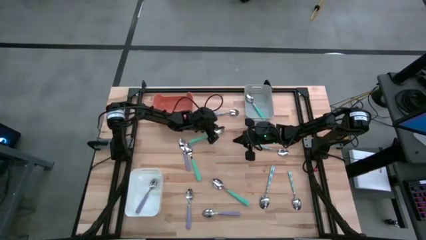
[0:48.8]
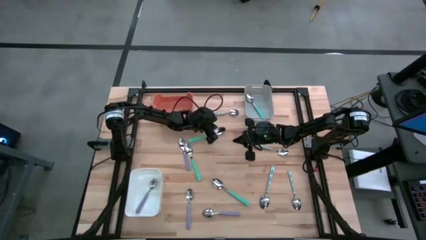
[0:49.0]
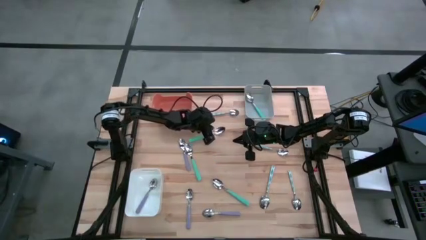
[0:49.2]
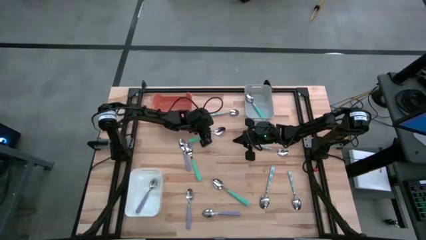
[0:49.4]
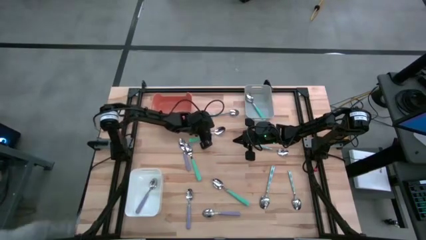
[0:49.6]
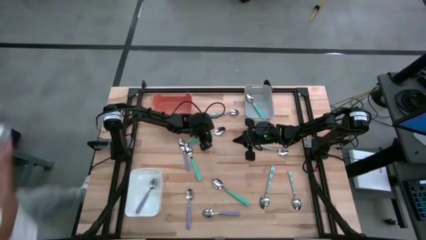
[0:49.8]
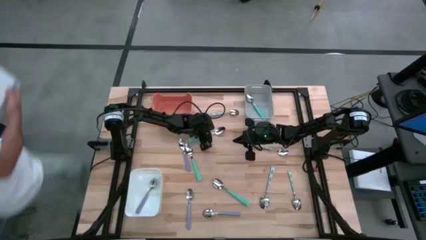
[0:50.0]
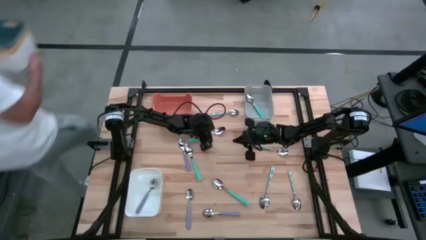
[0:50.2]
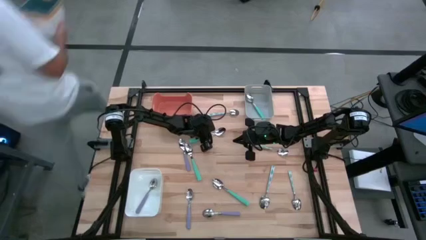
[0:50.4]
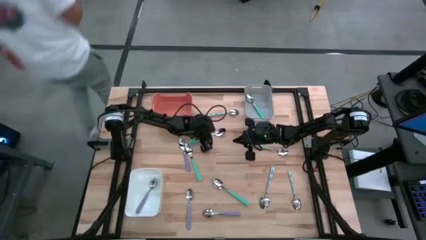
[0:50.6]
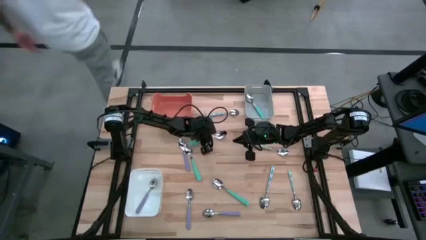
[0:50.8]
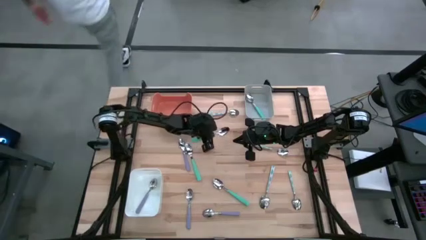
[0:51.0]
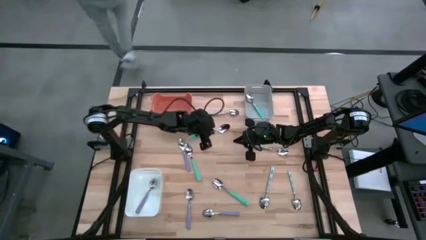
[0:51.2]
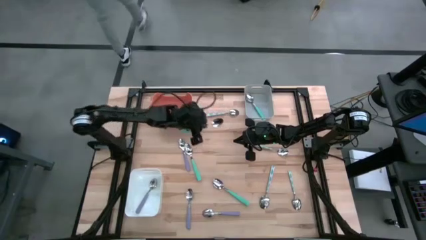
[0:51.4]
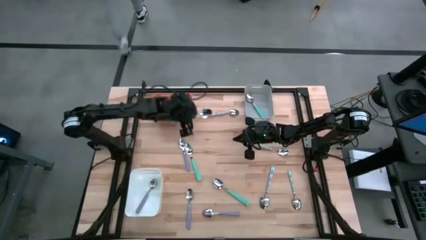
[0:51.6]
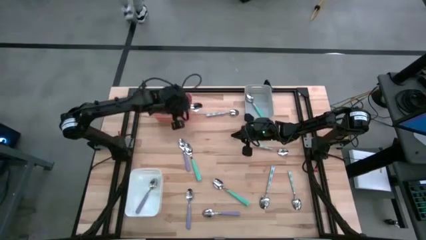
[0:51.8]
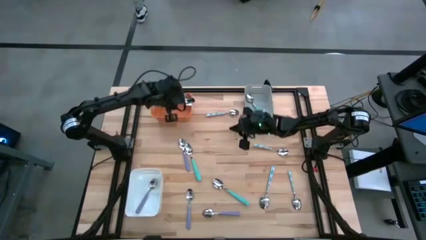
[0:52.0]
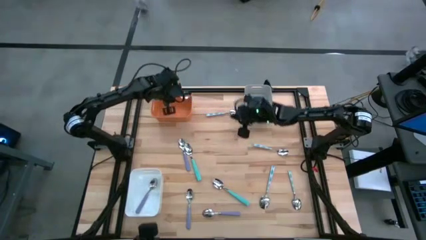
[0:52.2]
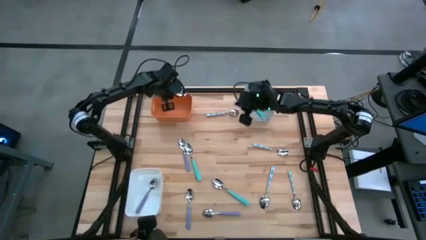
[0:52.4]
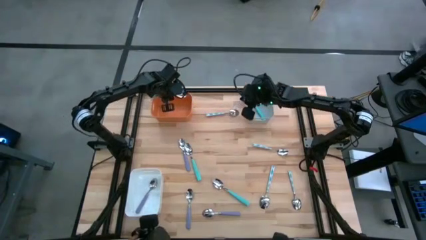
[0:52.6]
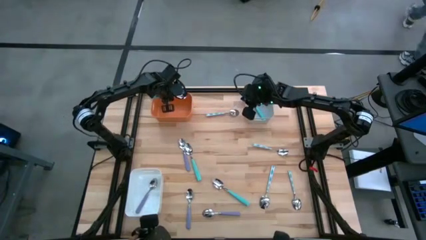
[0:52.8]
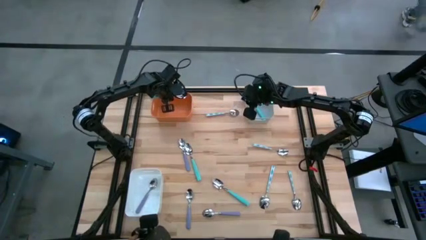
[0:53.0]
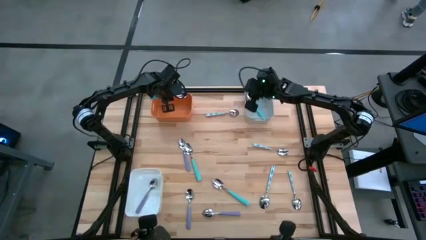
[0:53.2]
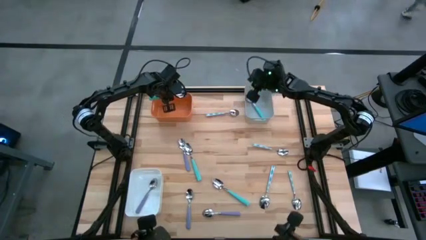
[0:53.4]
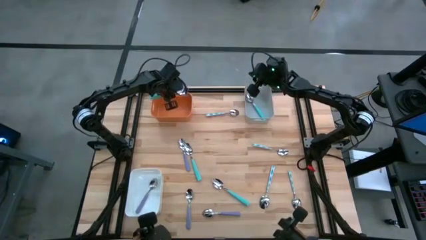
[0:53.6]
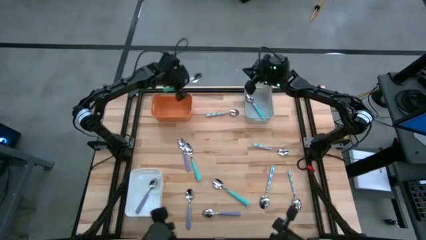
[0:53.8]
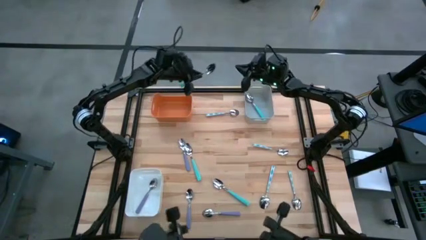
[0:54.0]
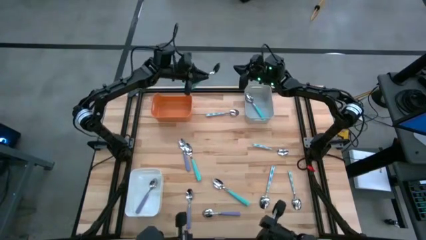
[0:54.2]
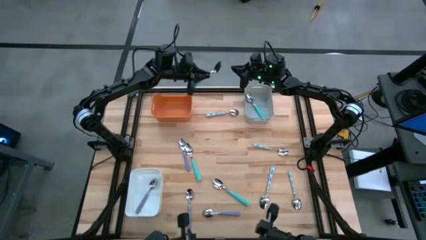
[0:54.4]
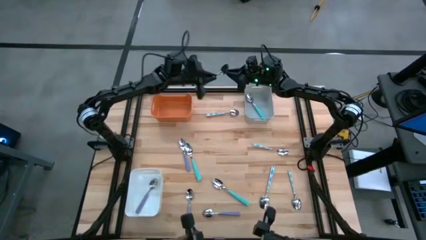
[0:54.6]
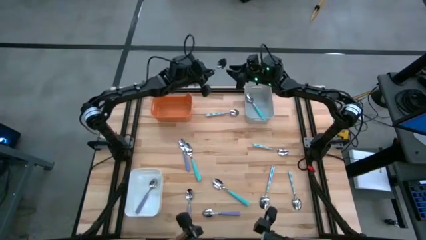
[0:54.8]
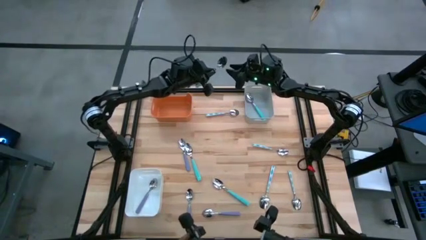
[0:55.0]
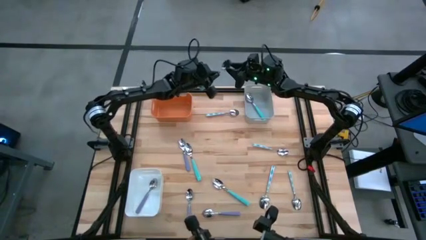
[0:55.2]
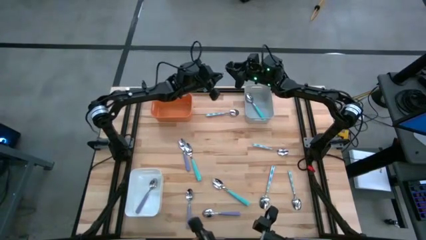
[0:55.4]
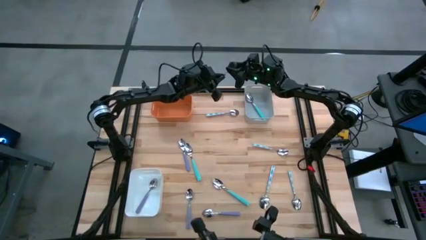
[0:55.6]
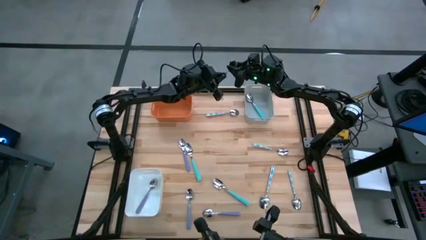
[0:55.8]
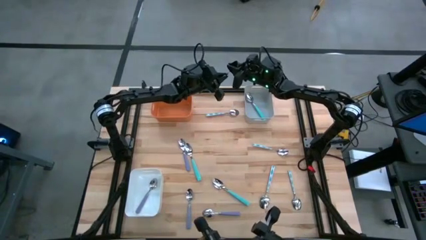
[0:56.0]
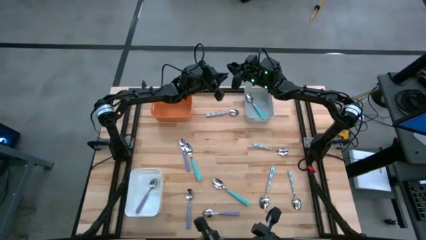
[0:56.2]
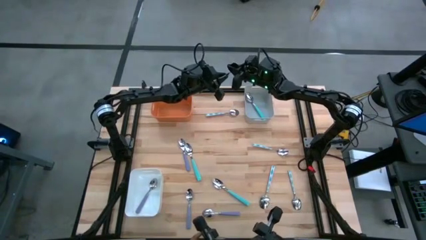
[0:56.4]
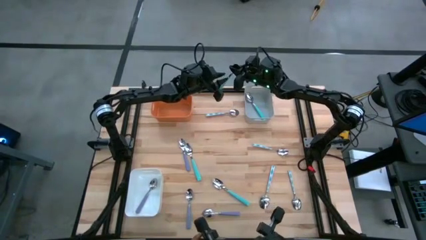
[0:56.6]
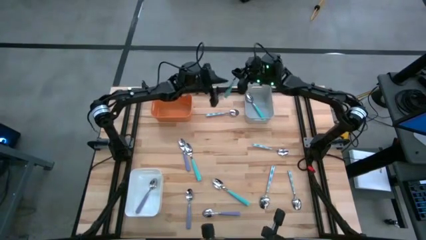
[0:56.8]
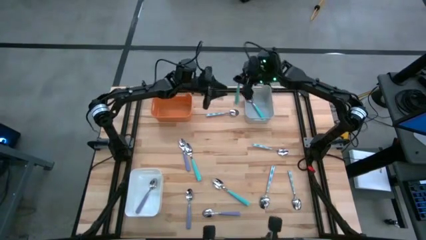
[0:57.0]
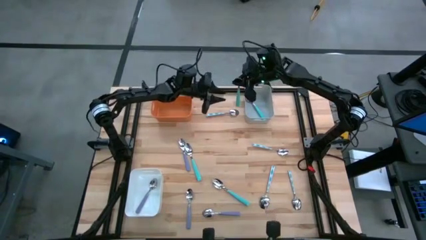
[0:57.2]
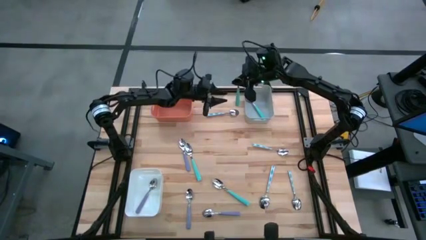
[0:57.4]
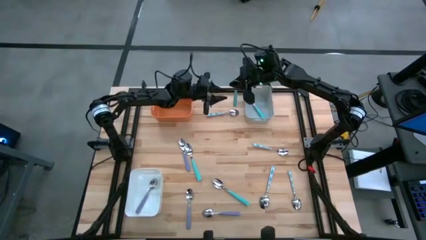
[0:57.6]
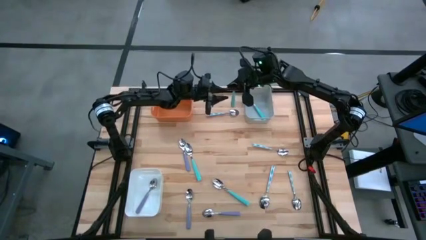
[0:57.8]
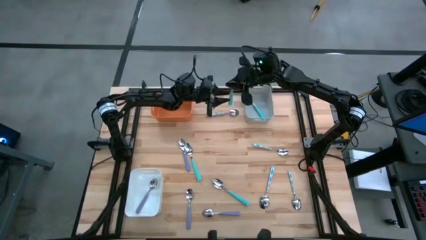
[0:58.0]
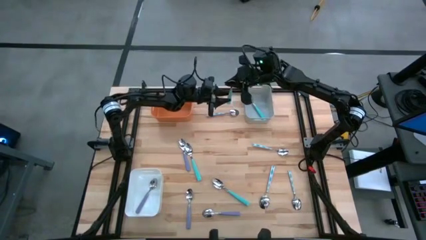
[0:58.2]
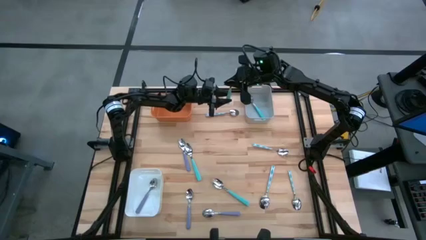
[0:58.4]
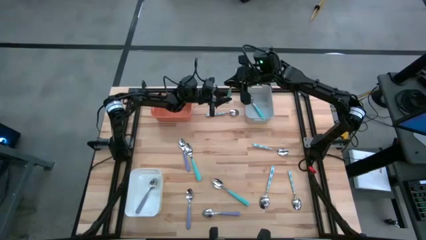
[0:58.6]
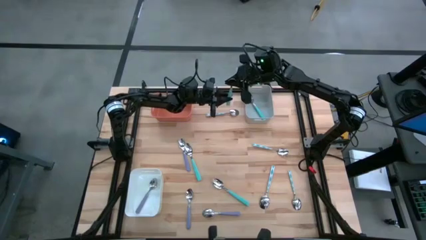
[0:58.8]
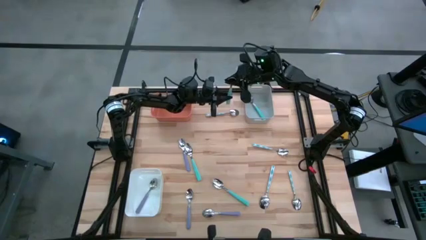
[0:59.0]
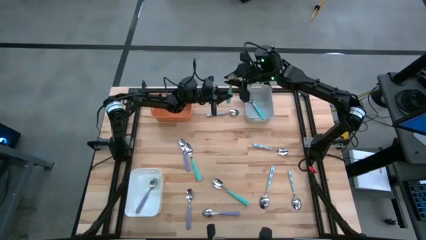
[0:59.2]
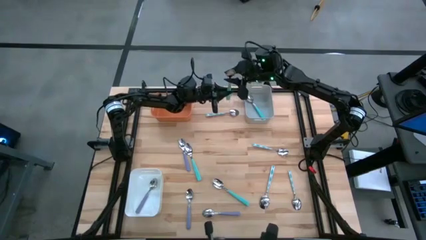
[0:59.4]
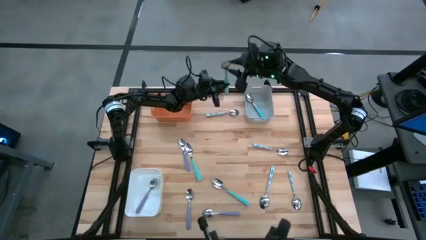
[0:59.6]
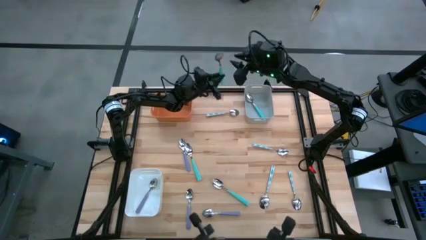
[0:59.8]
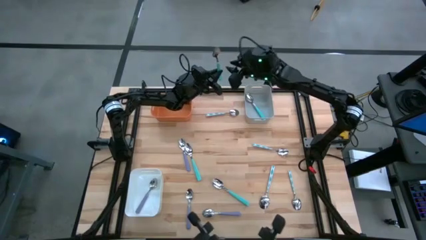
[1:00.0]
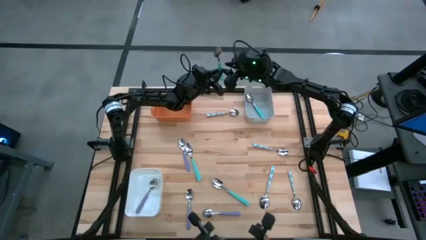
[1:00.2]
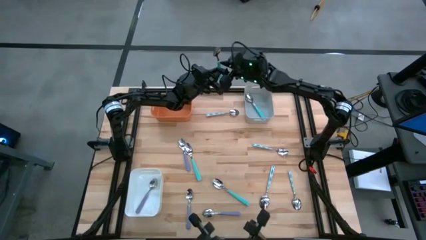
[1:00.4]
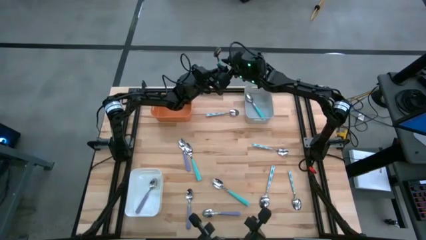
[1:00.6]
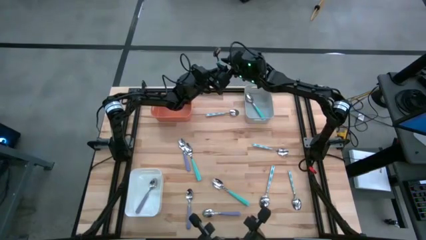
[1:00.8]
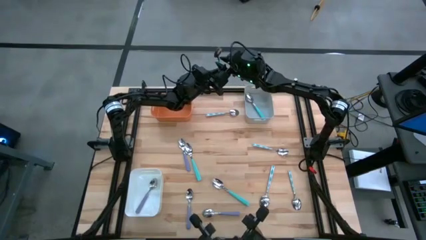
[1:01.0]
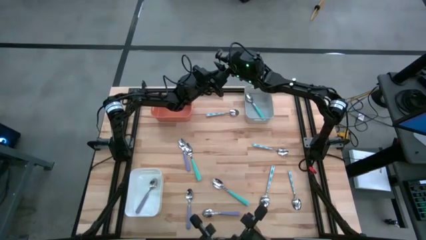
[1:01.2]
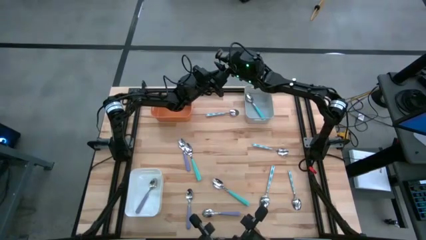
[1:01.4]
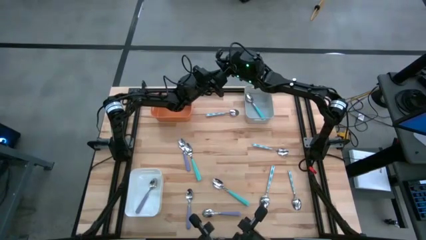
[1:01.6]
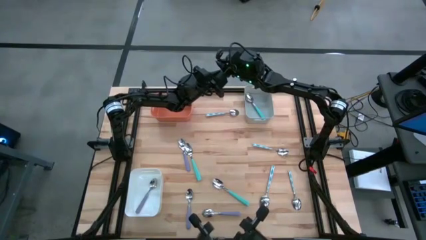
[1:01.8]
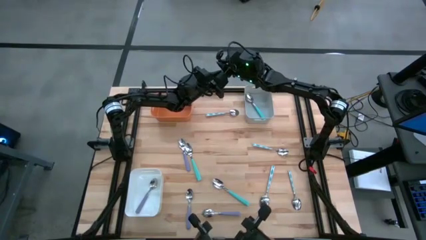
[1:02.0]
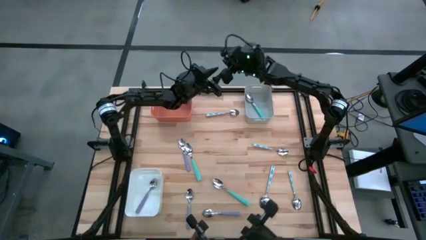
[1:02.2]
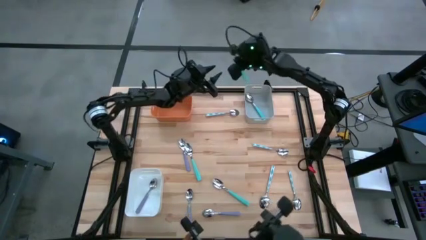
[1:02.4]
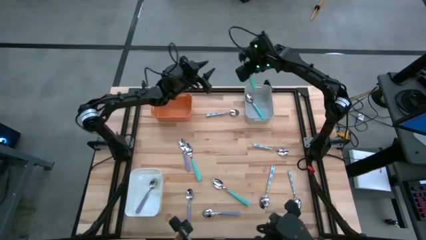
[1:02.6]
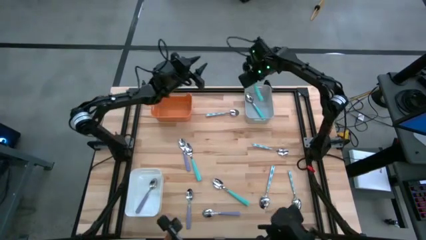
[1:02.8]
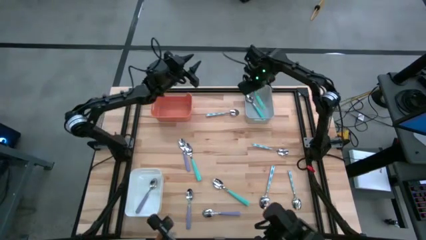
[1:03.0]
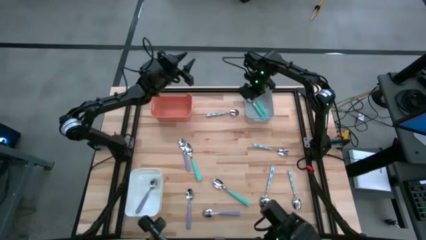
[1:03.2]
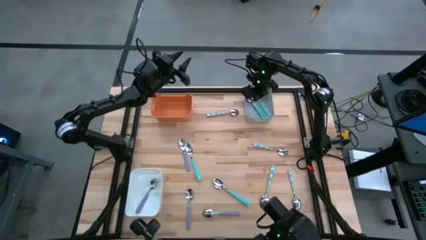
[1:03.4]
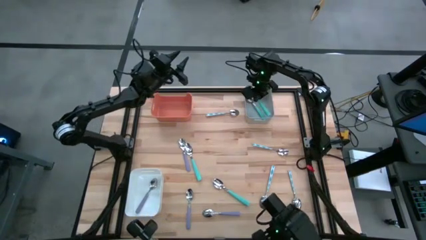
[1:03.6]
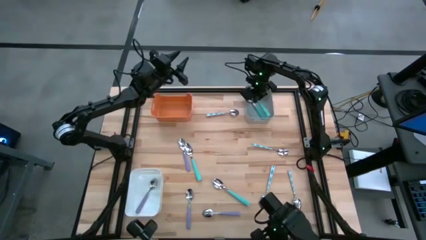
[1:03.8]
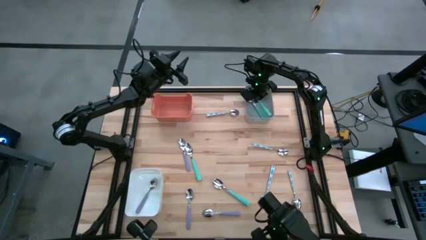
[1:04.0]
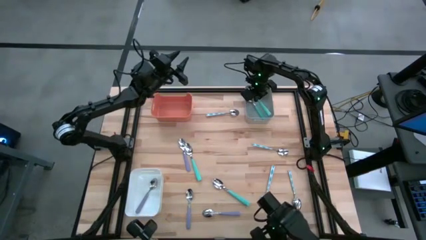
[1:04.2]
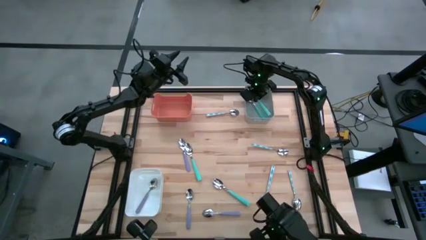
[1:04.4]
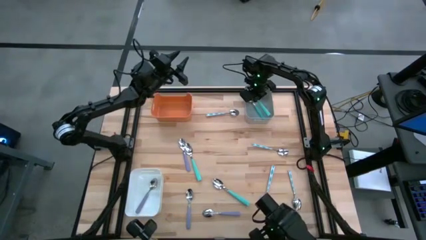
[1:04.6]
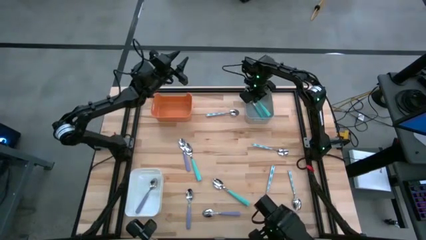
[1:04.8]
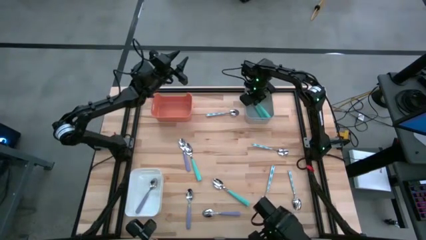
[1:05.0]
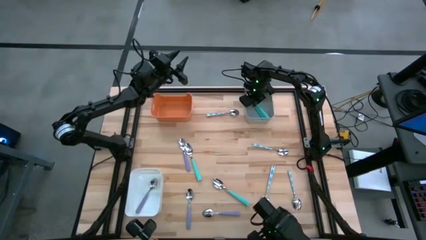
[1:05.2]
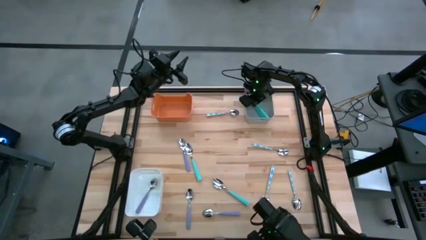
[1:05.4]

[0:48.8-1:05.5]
Task: Sort silverware by color (type)
Put the top right light blue spoon into the gray bin
